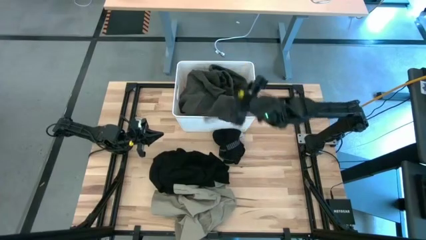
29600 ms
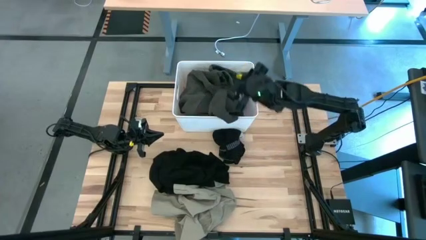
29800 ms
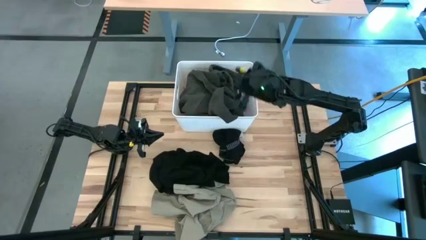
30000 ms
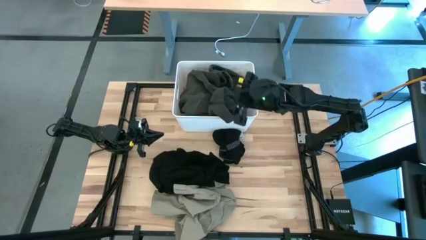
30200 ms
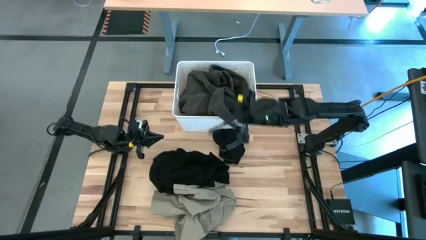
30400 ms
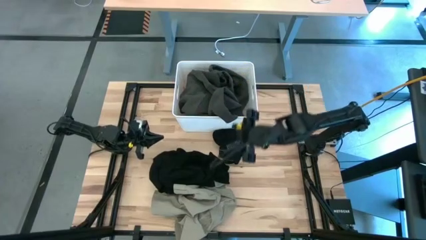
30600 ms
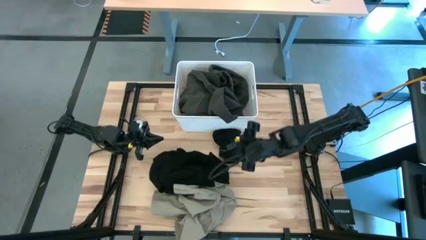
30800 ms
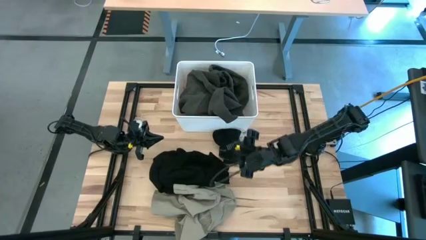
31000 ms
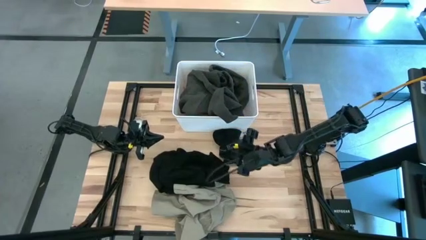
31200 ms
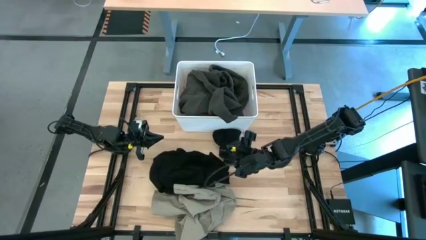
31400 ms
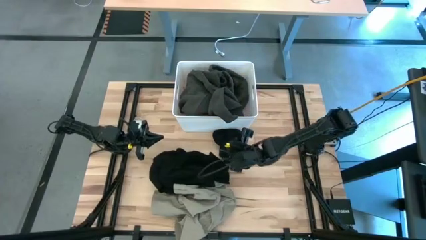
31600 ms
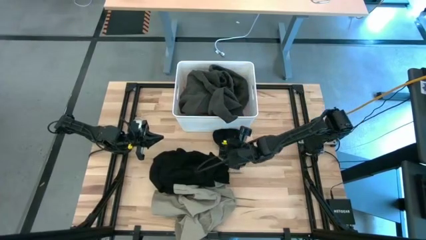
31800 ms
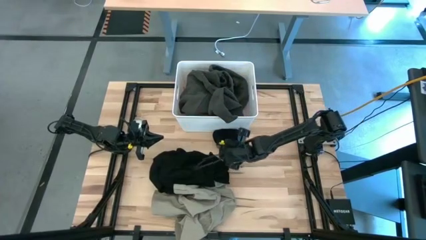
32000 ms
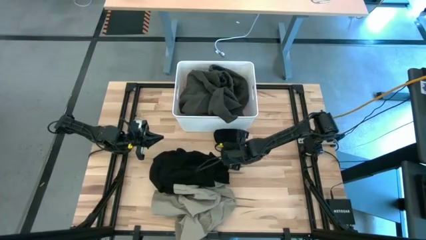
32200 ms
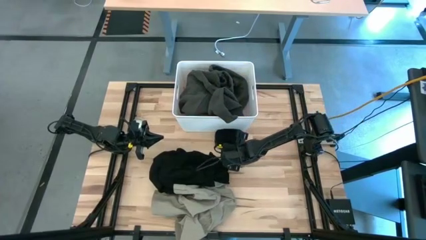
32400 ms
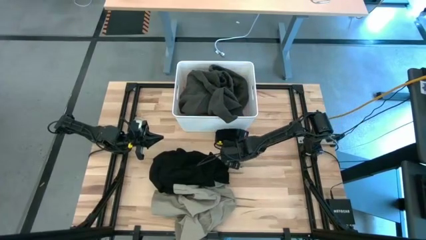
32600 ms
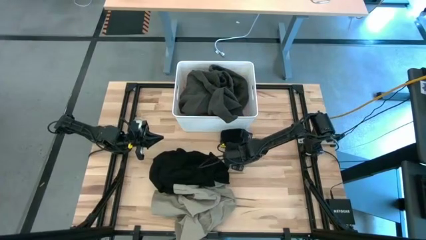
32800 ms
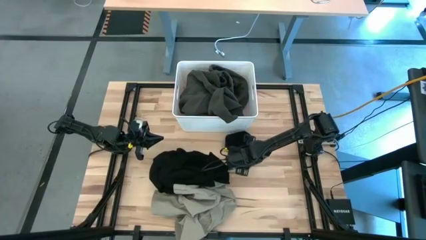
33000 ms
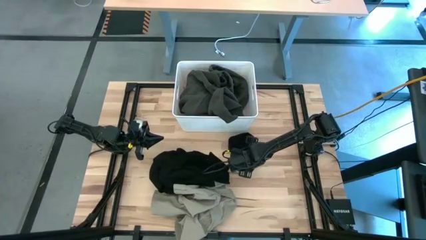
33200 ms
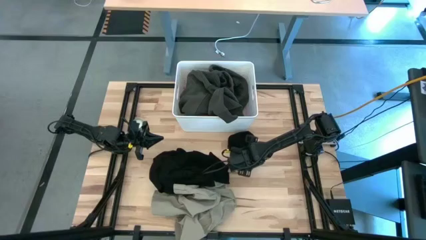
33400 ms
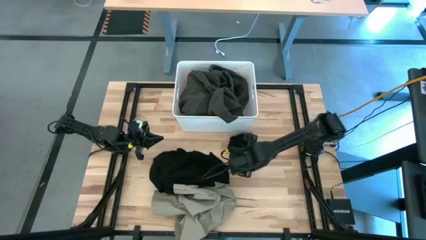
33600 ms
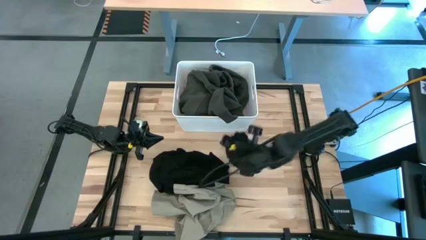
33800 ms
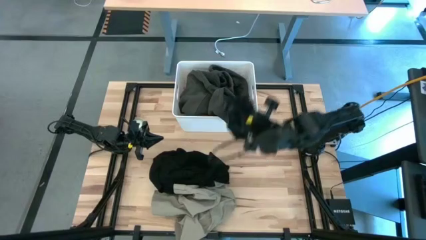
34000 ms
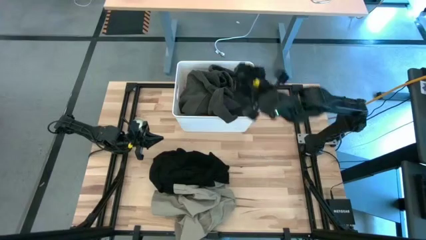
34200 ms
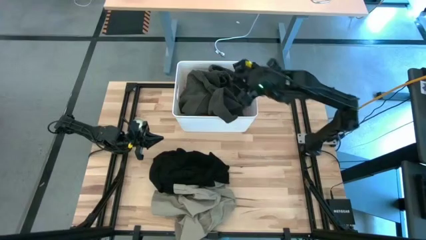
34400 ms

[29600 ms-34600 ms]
Task: Sort clothes
Put the black boxer into the white laundry bin

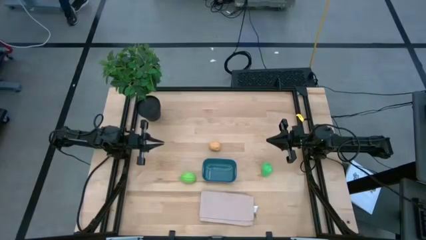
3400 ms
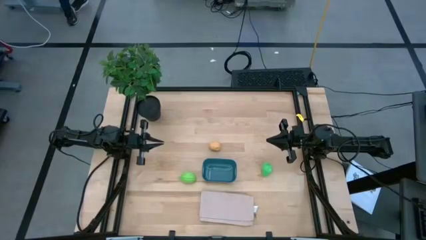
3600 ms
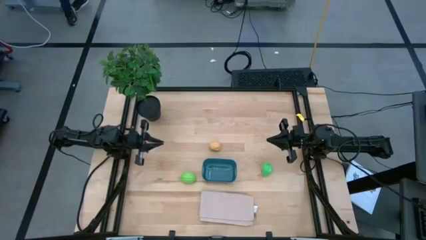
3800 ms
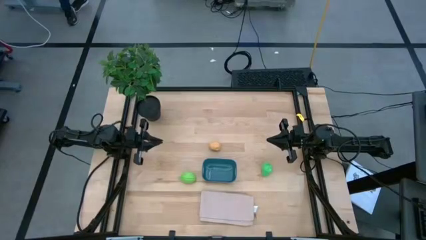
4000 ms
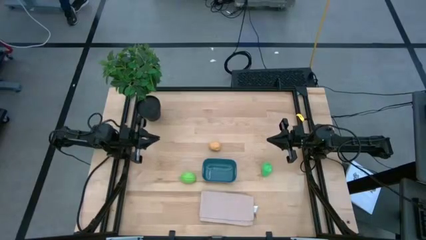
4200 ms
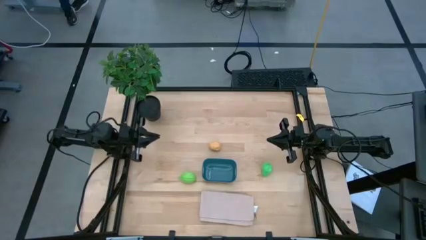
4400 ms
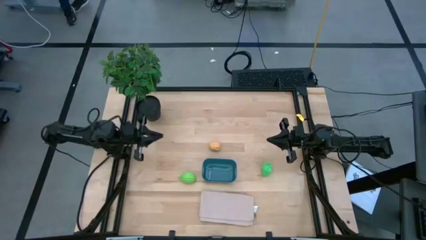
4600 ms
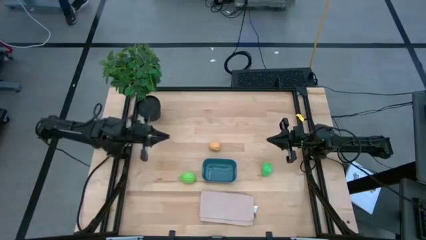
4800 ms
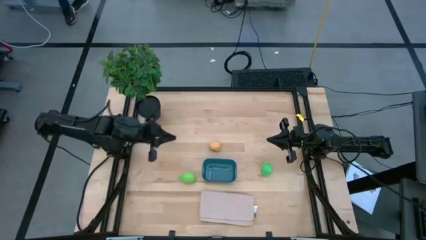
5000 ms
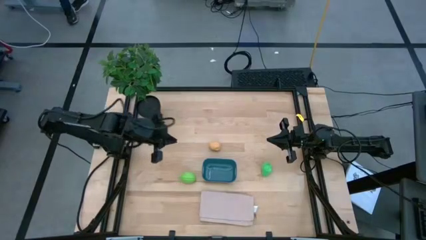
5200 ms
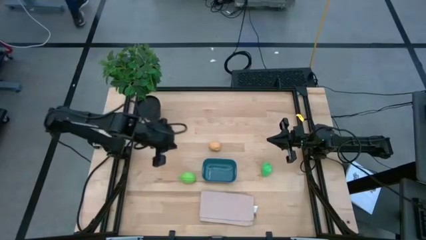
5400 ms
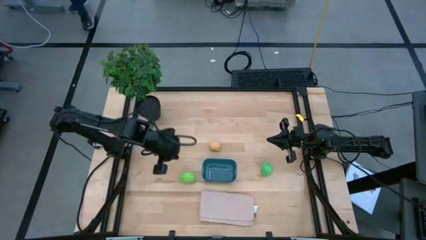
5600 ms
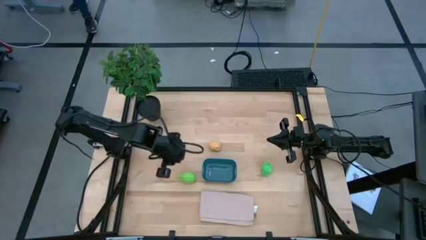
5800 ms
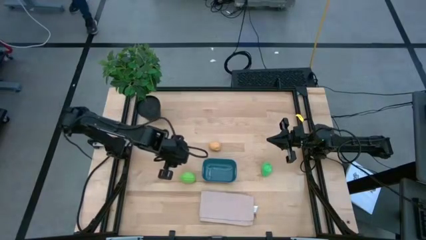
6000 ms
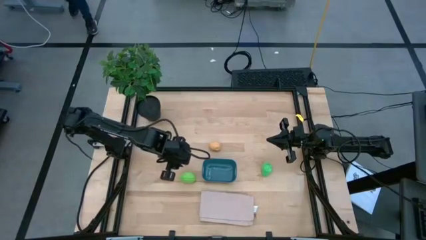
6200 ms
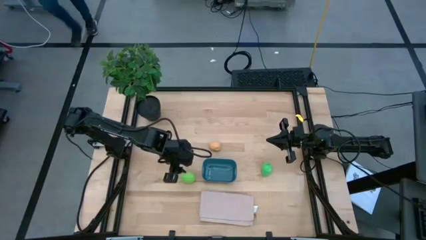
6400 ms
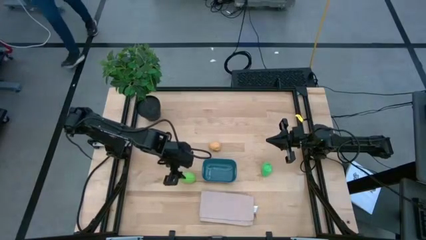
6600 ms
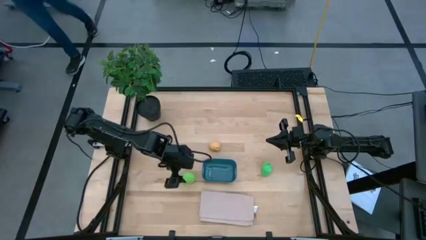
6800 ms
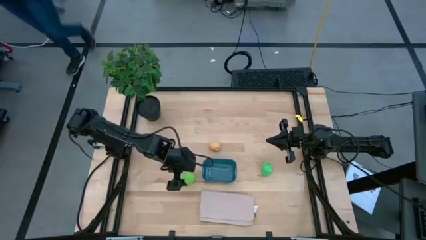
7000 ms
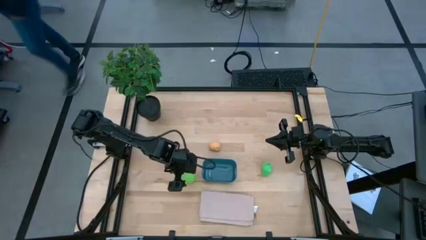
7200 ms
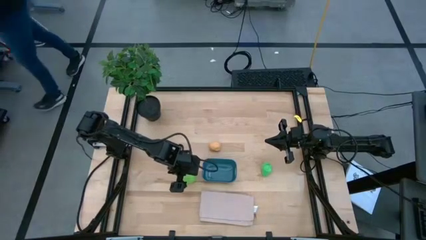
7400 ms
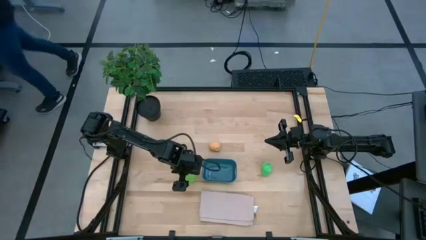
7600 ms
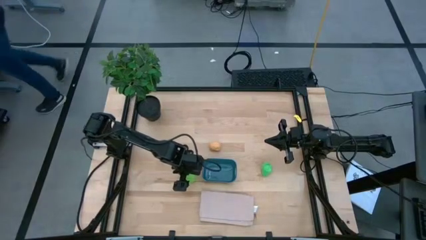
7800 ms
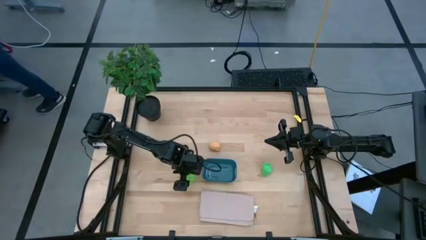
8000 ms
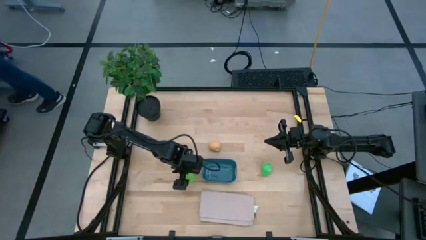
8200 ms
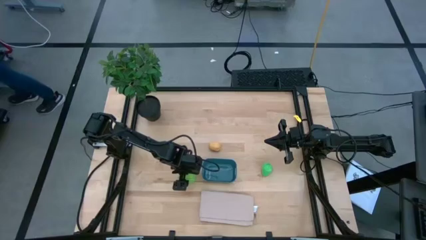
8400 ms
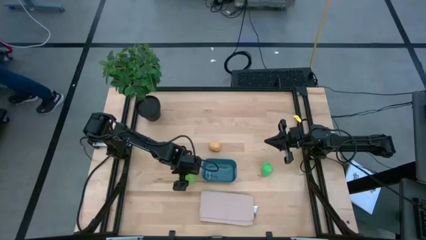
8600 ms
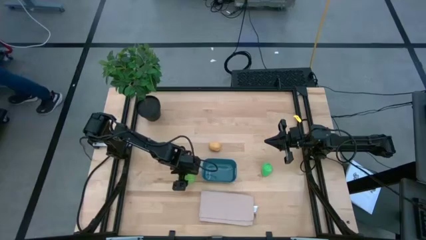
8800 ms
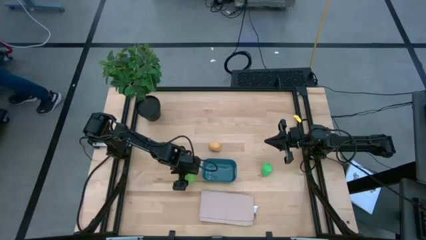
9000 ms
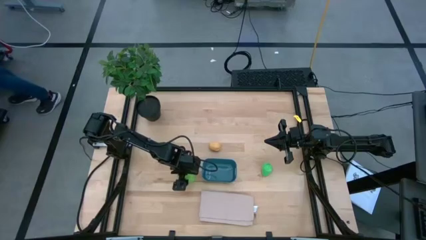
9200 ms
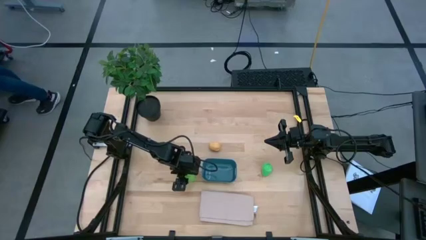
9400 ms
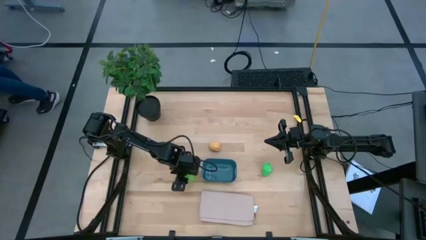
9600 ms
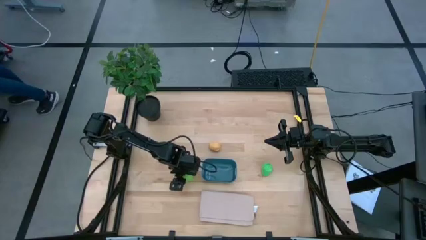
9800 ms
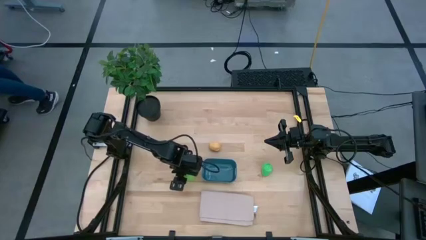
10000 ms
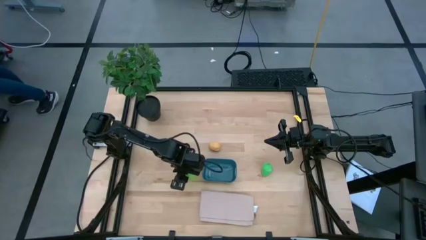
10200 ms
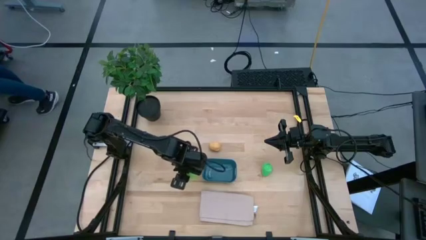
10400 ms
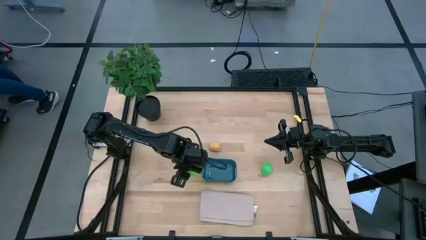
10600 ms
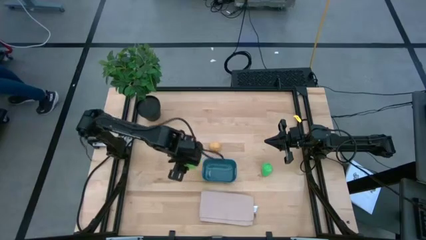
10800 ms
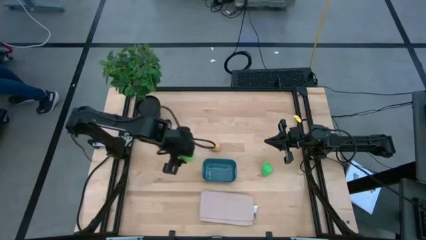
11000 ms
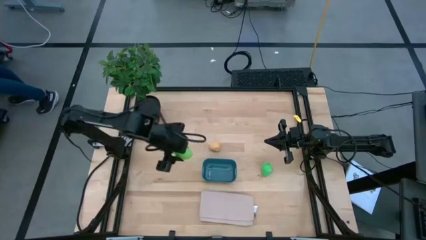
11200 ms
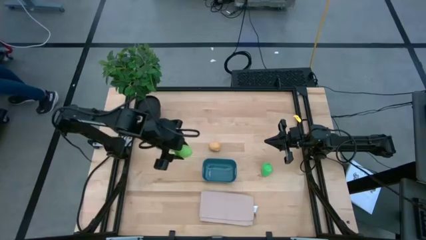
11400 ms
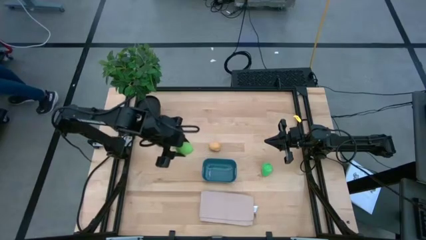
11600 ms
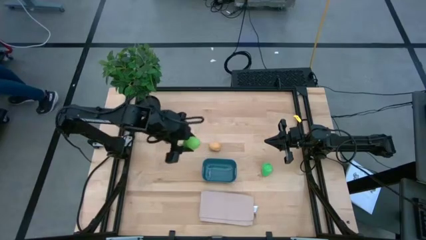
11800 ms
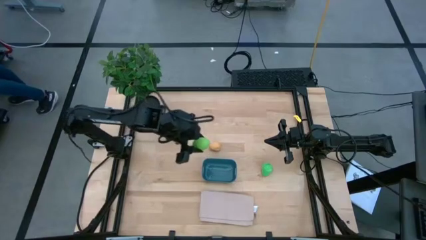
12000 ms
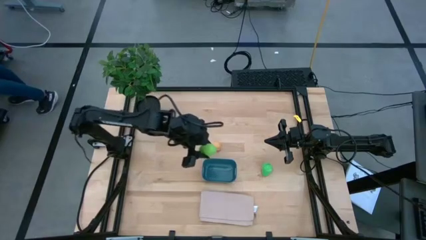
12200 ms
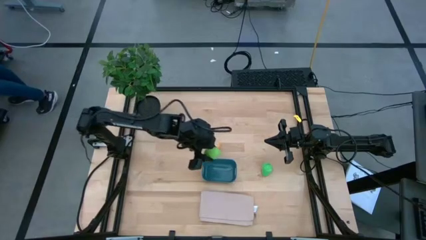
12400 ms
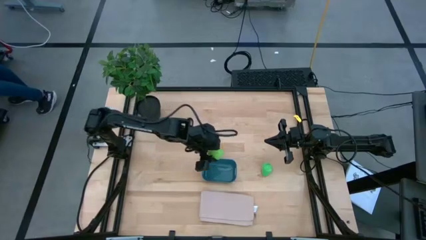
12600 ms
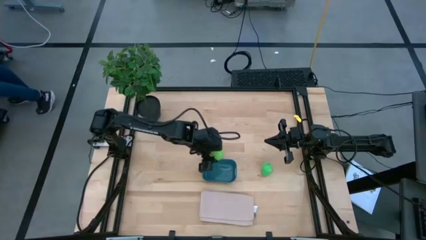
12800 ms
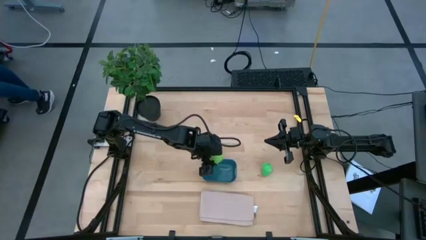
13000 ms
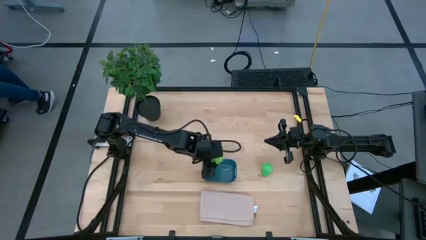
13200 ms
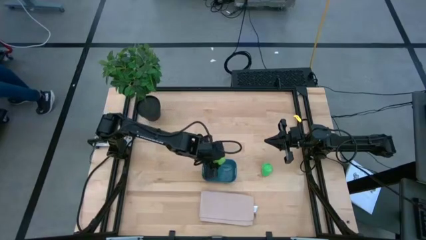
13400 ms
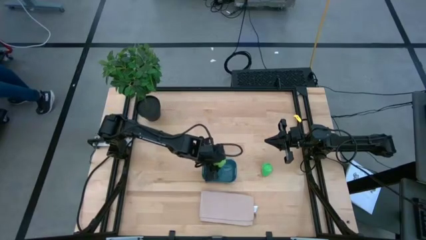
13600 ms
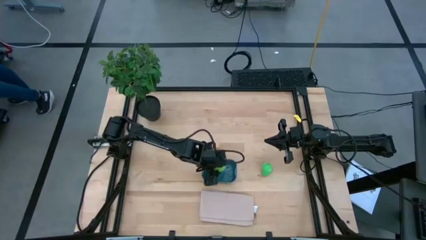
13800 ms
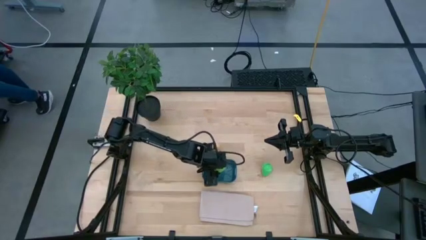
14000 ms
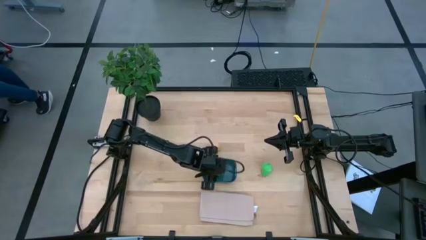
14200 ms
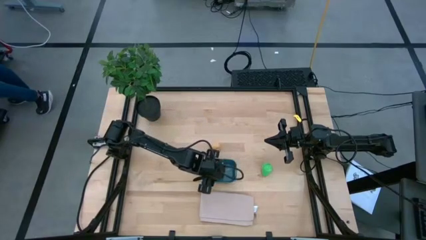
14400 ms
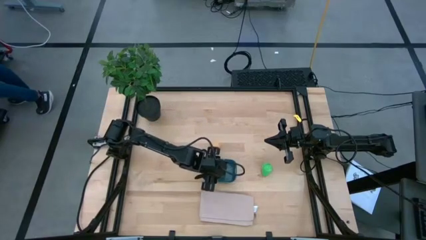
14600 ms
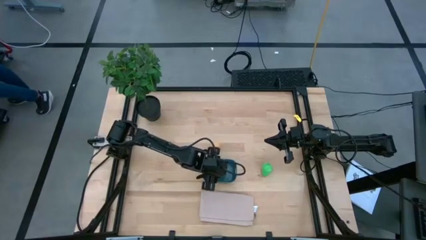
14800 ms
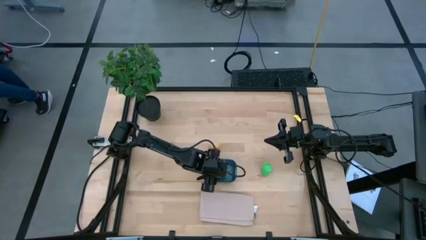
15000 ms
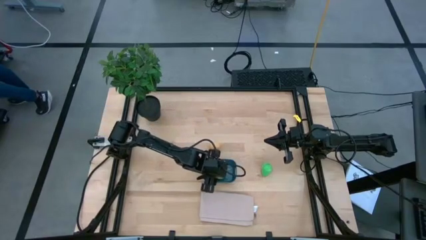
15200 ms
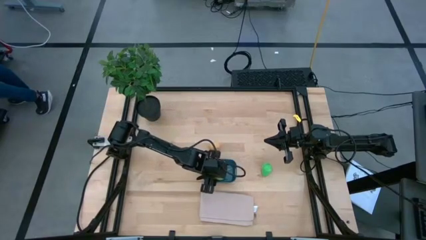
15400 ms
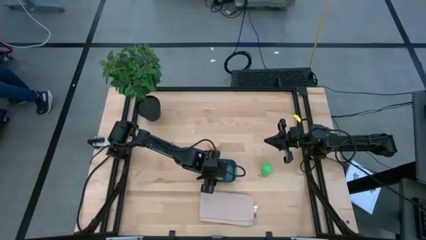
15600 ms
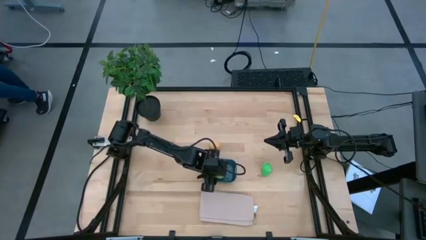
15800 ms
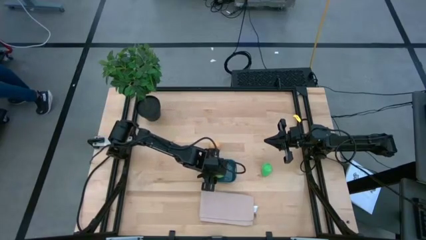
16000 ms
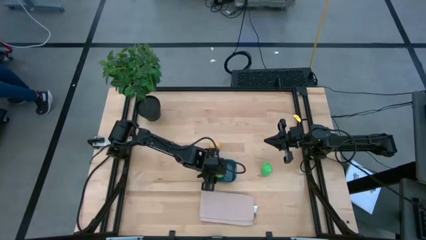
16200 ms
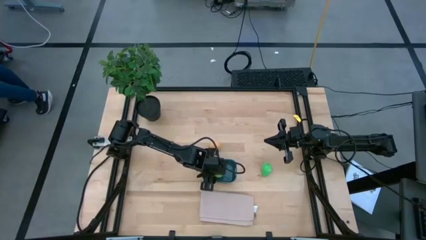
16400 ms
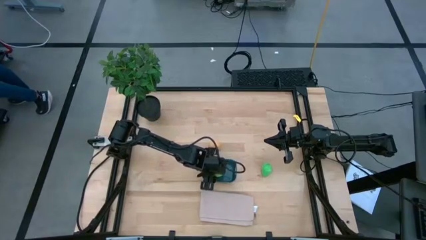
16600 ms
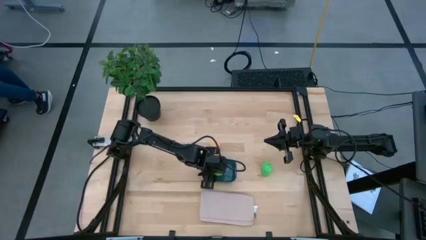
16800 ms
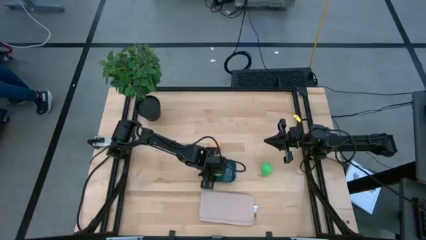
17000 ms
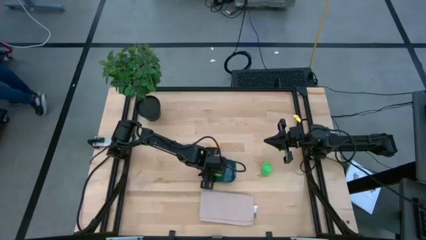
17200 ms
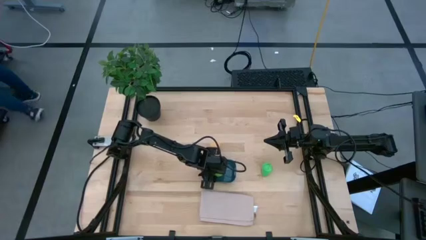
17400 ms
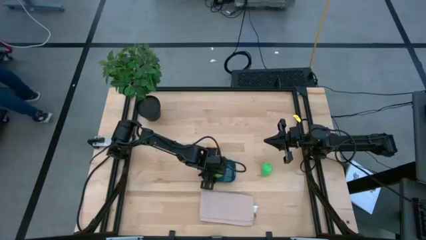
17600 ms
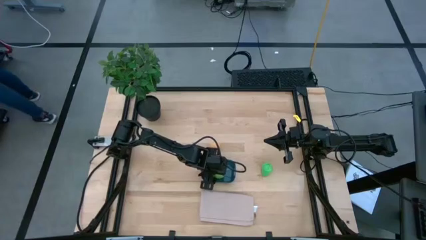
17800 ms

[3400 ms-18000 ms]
Task: Pick and placing Produce into tupperware
Put the green melon into the blue bin
